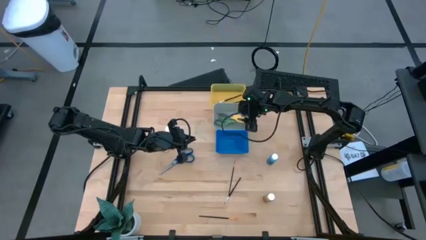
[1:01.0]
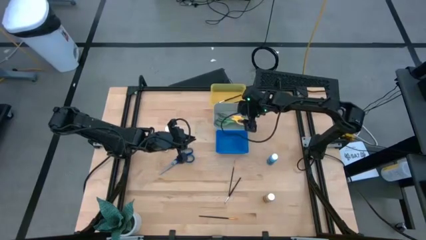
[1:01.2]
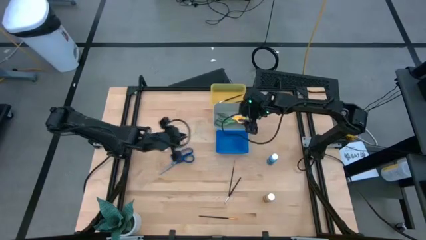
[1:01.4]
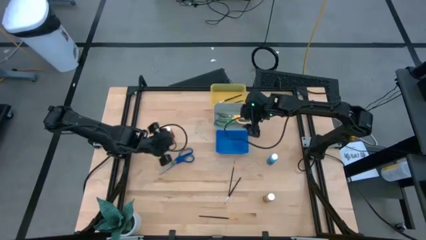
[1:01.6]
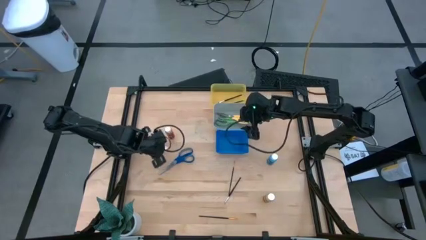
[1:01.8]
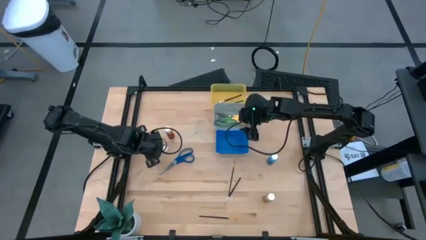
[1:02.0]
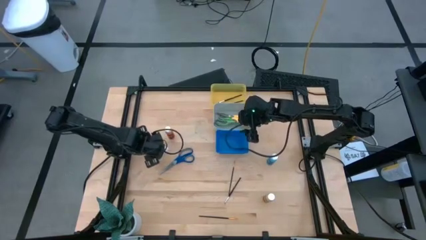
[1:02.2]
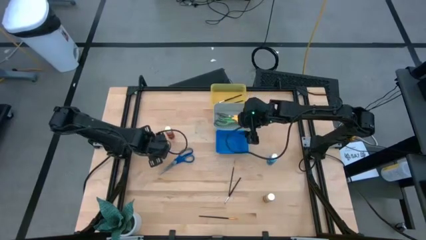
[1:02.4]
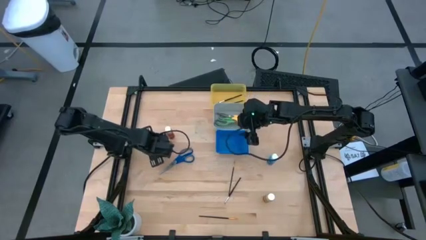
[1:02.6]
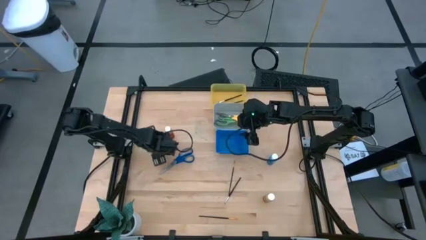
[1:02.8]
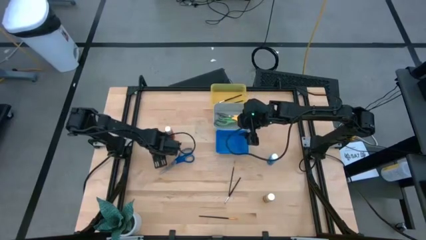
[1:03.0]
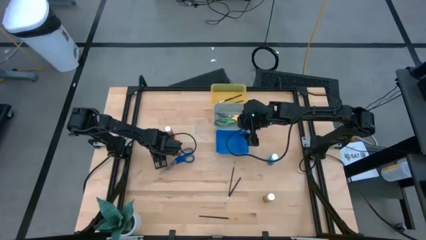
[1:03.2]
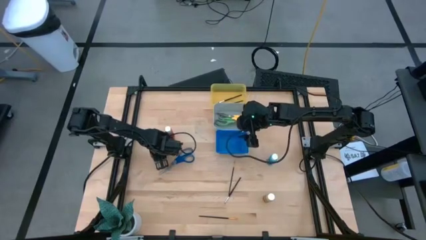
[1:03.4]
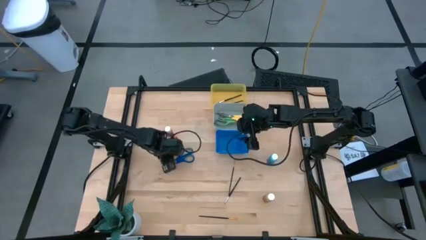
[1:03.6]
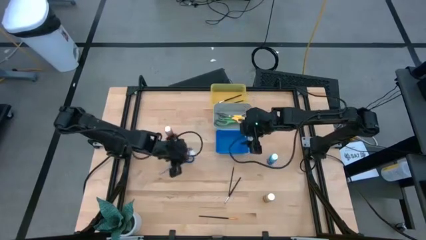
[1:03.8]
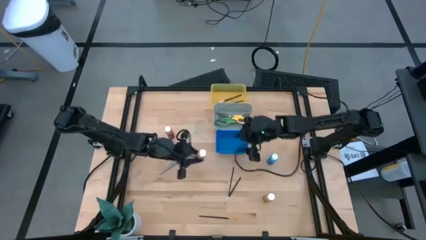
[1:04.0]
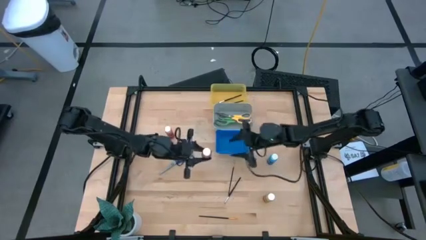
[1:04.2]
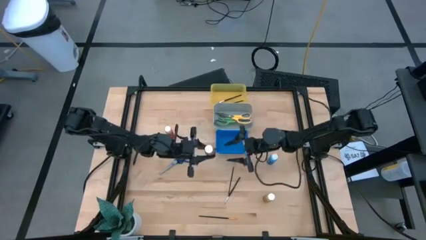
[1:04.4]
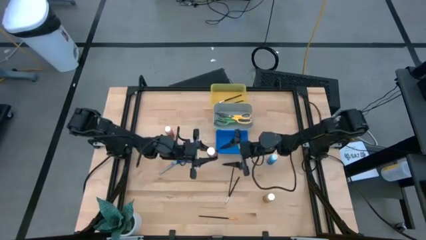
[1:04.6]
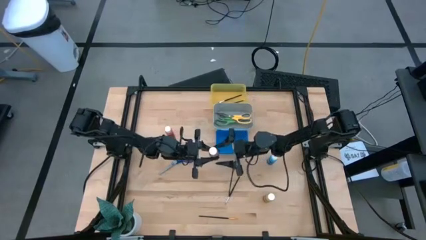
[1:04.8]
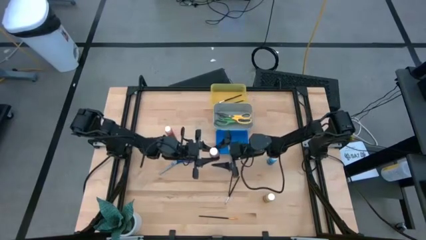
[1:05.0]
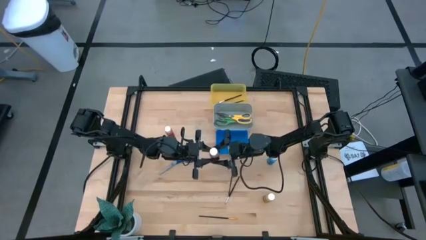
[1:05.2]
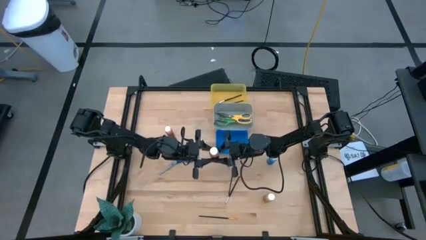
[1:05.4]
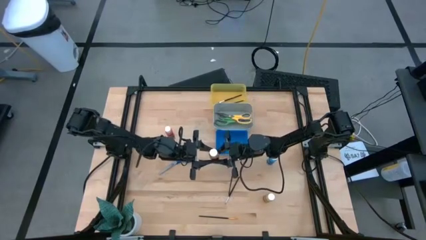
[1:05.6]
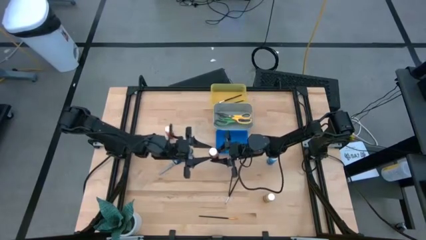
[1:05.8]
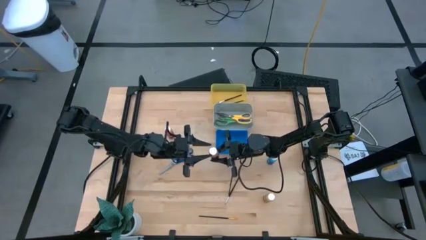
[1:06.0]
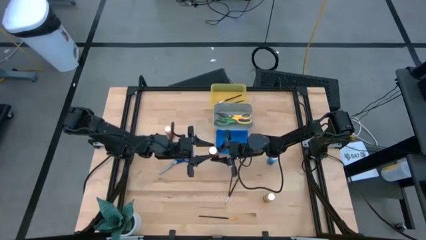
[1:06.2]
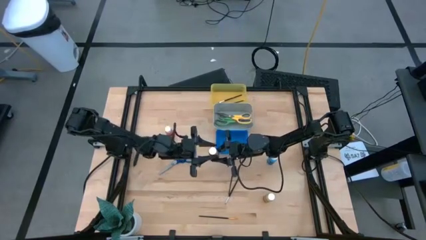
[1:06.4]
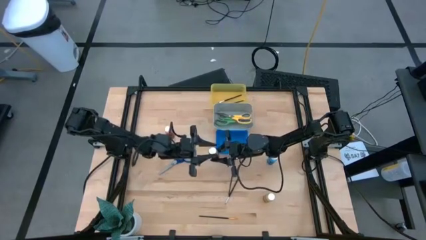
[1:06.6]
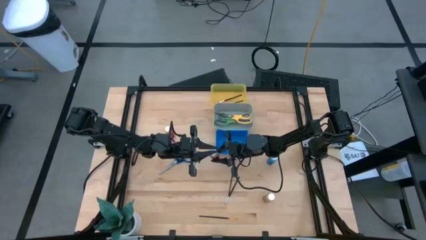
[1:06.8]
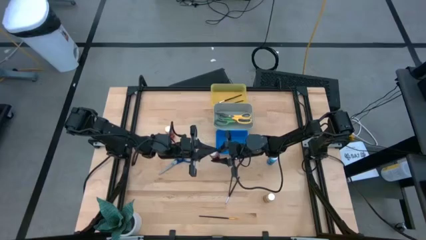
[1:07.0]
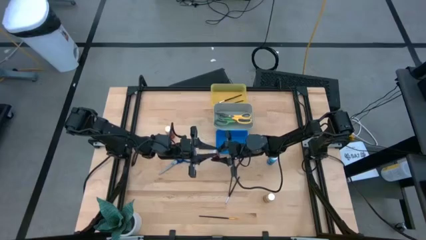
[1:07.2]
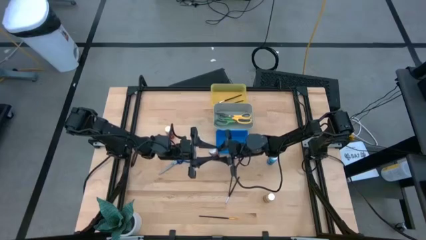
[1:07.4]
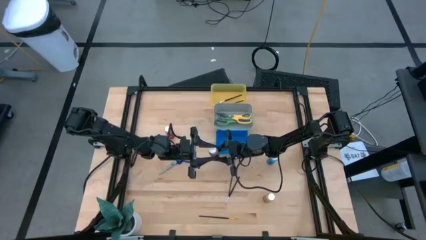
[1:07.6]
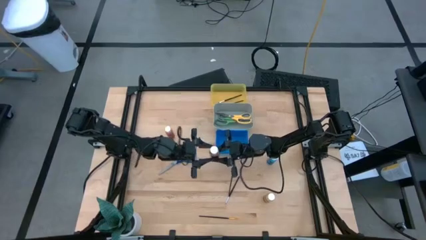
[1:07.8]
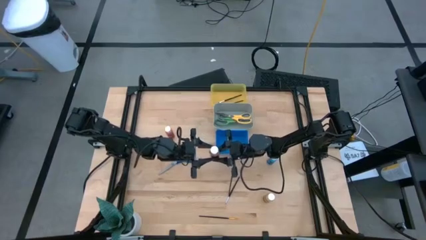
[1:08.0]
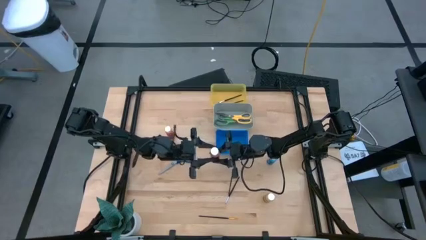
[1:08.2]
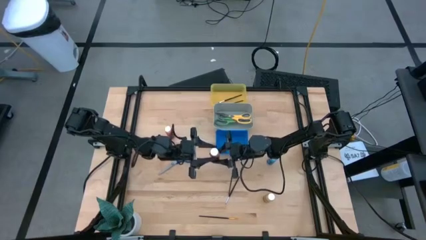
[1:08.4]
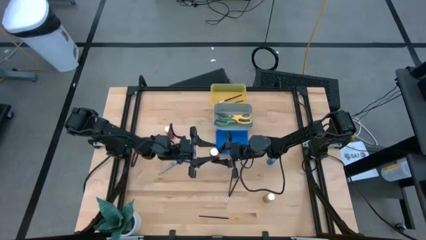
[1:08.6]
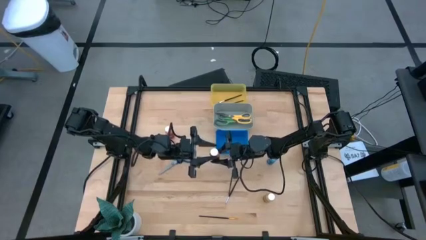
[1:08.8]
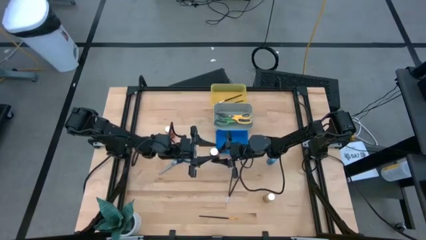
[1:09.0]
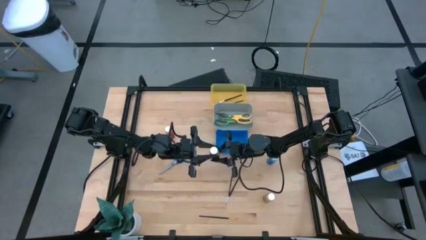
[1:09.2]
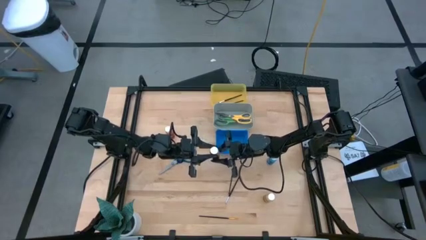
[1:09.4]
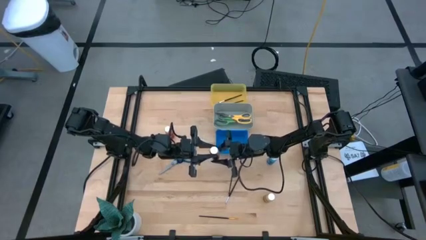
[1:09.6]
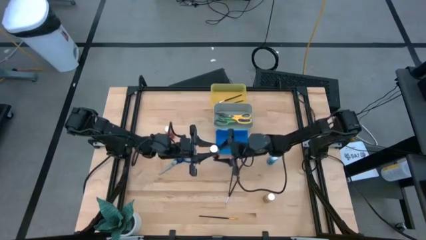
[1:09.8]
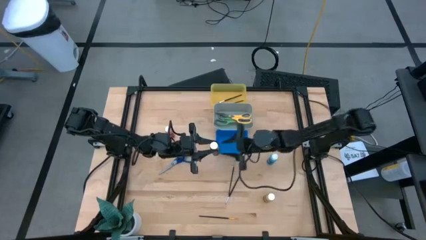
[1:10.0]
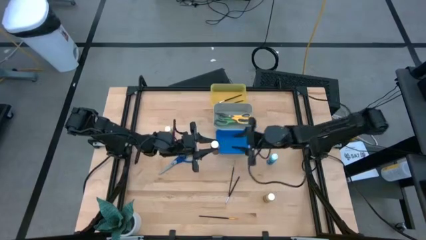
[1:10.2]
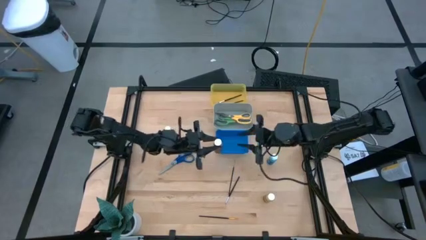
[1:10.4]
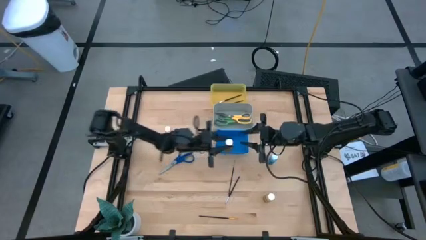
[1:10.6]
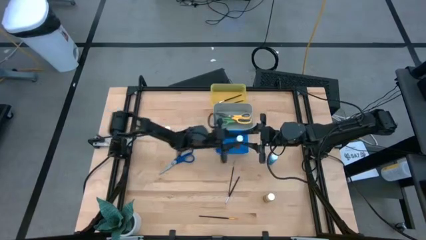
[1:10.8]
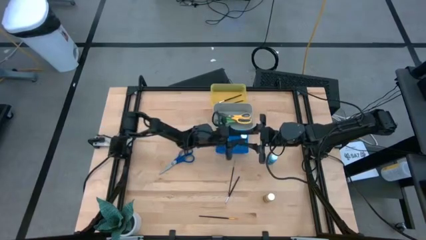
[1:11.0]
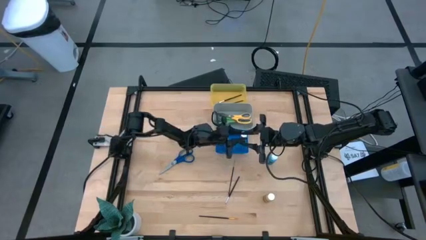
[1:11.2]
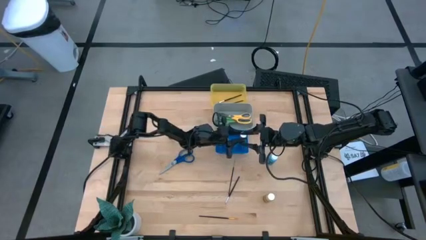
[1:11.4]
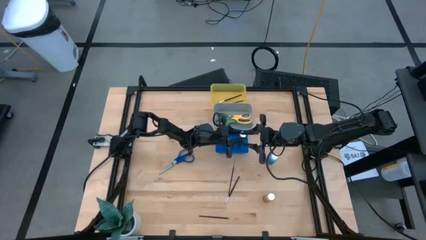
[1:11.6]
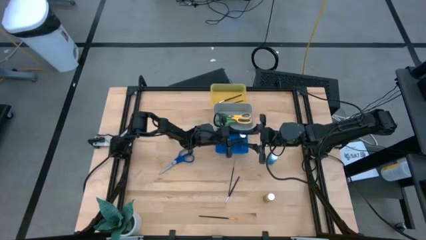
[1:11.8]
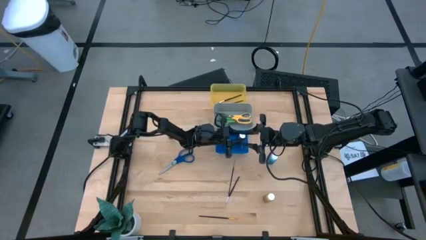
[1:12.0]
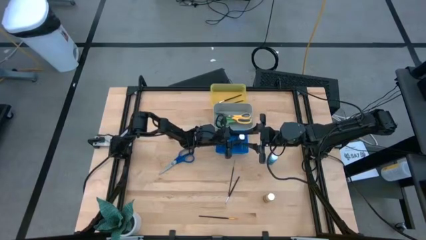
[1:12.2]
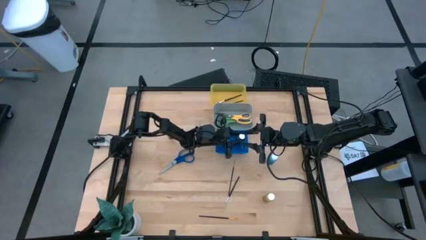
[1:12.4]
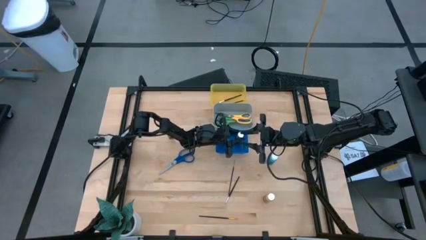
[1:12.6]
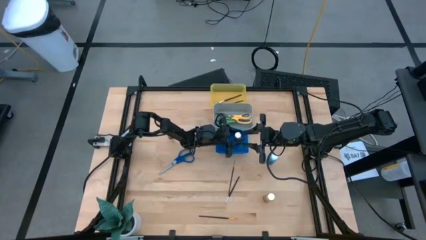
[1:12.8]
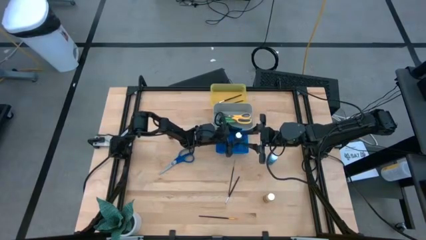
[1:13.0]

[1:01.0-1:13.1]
Task: Pick & Place Paint Supplies
Put the brown paint bottle into the blue bin

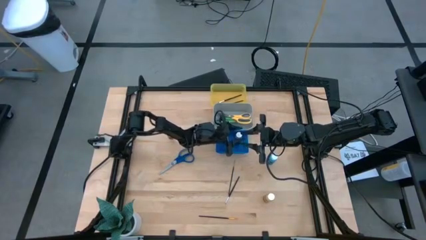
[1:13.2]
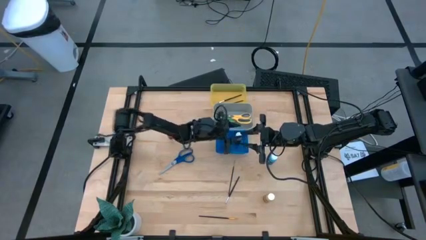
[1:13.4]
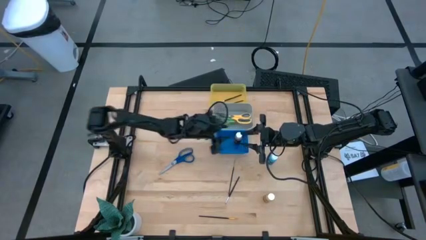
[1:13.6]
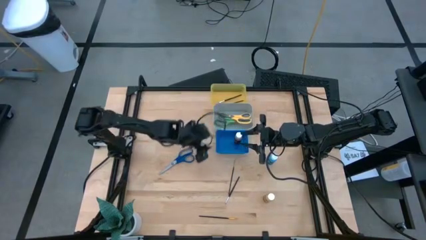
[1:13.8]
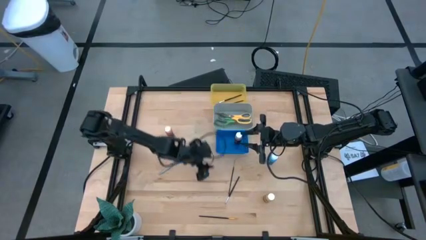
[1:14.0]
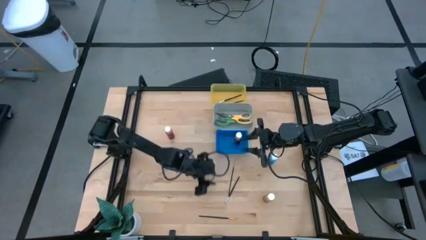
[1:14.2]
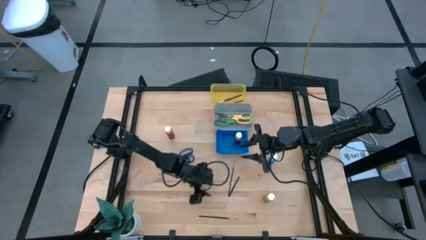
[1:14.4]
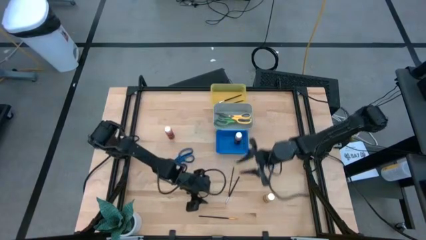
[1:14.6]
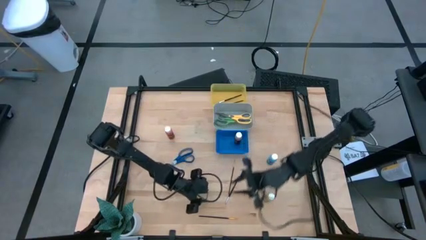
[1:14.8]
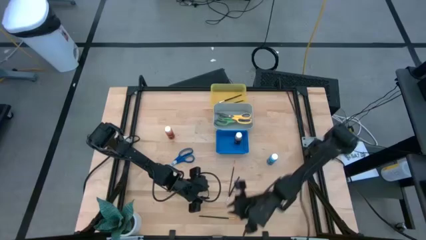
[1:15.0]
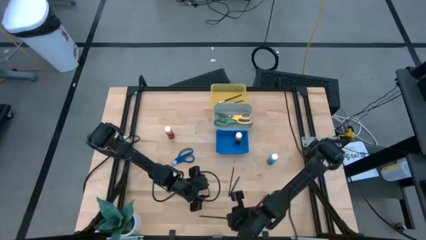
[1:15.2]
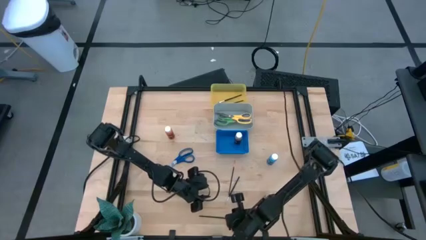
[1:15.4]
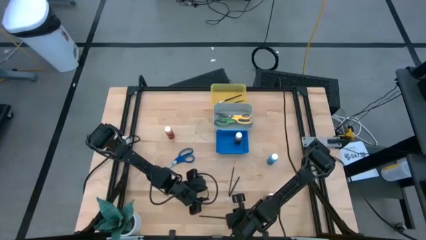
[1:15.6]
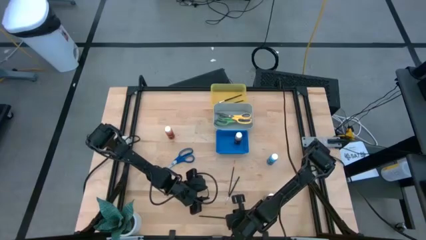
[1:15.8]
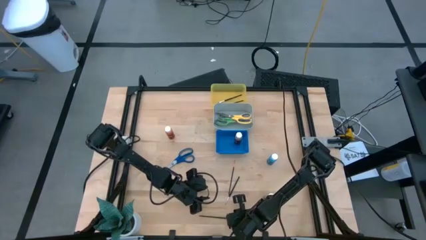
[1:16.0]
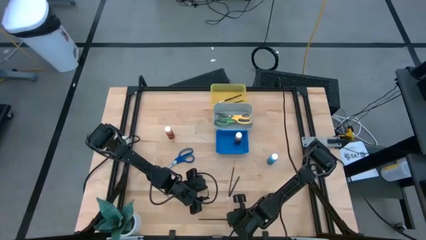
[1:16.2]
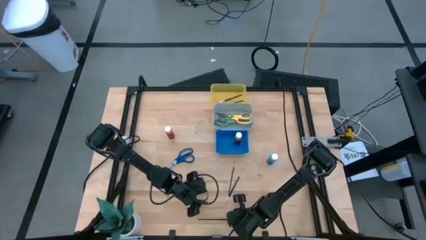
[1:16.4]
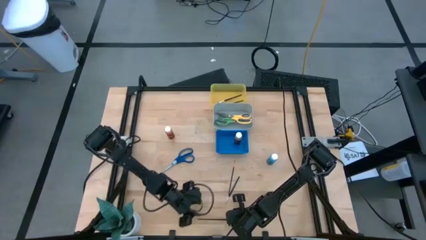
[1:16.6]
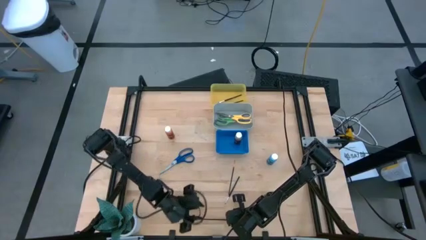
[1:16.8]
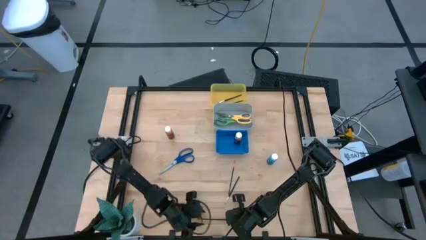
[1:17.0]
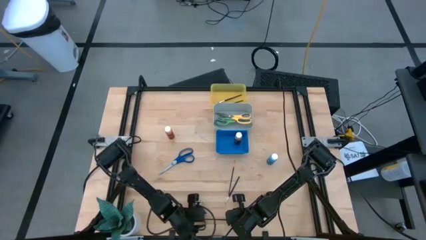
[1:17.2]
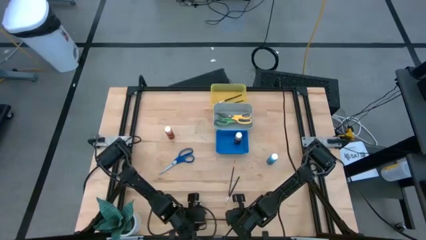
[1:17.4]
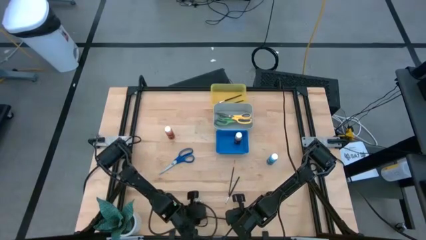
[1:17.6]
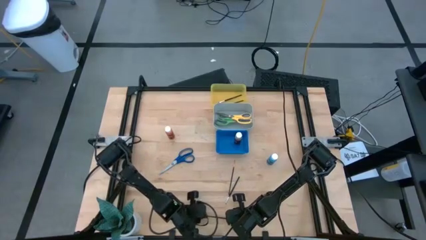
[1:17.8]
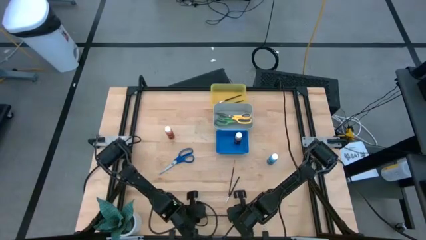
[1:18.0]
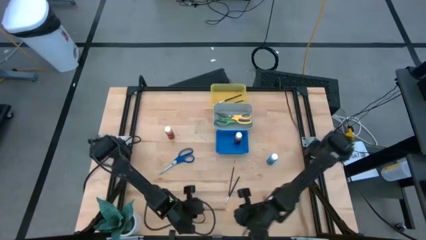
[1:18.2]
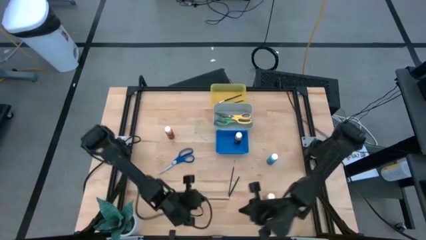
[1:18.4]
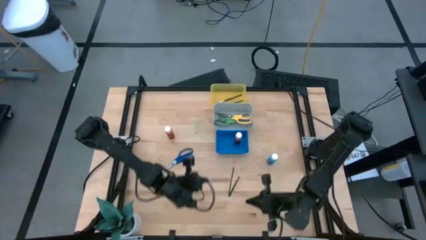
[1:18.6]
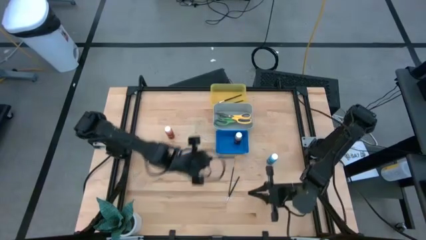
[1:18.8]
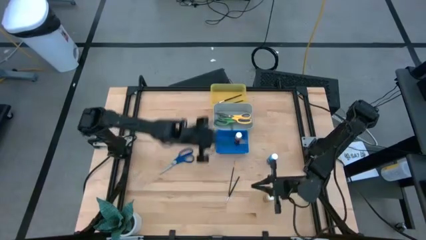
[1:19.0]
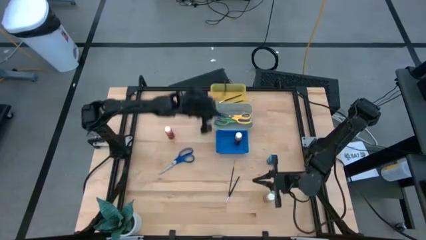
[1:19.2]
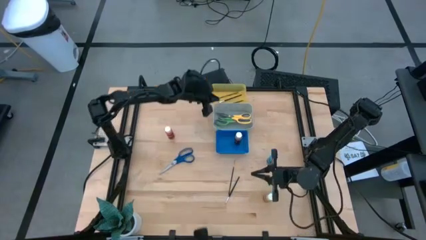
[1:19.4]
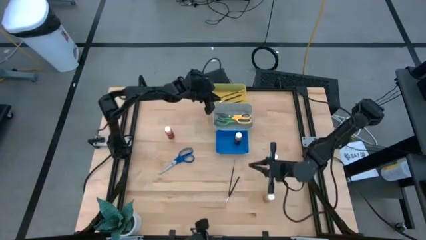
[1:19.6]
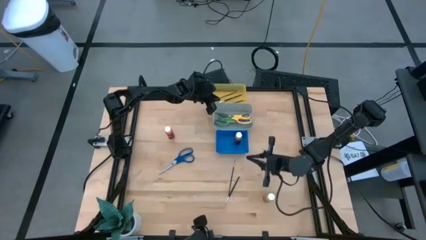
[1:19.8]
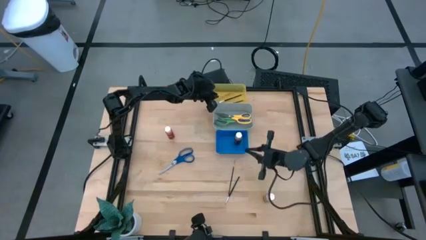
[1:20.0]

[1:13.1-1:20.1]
Put the bottom gold paint brush into the yellow bin
